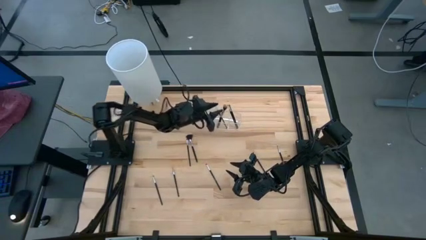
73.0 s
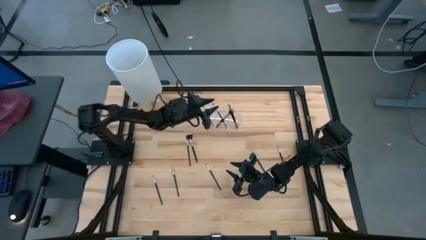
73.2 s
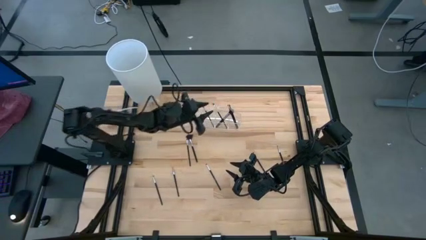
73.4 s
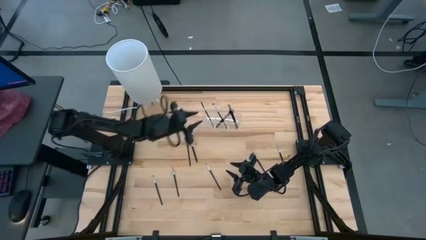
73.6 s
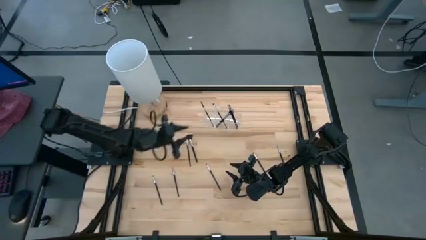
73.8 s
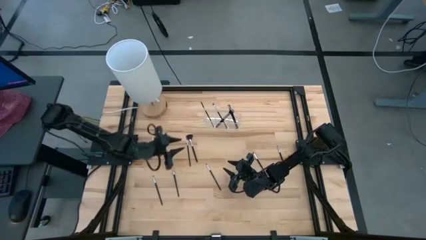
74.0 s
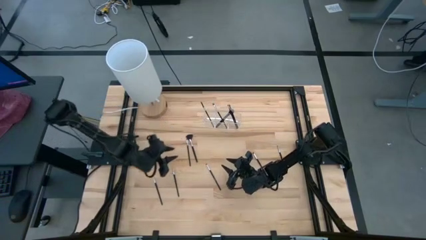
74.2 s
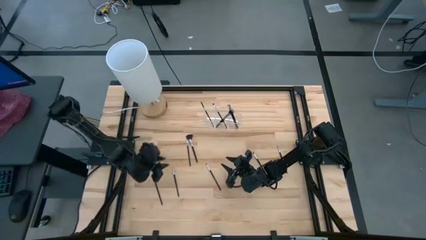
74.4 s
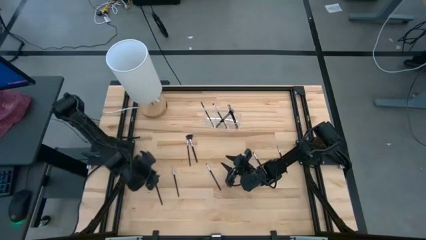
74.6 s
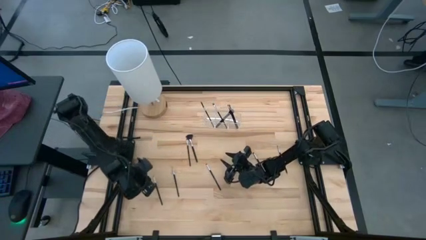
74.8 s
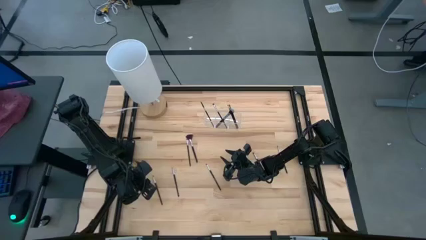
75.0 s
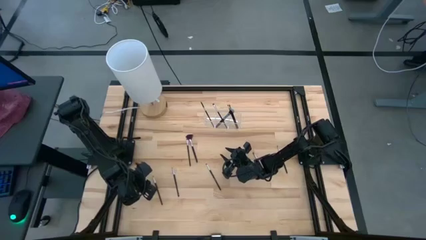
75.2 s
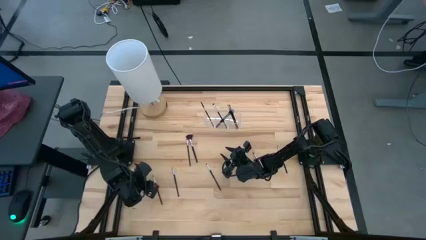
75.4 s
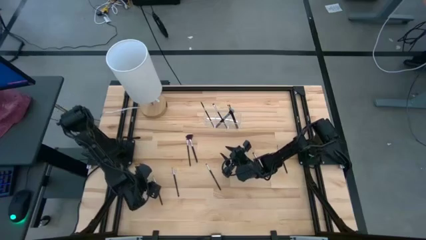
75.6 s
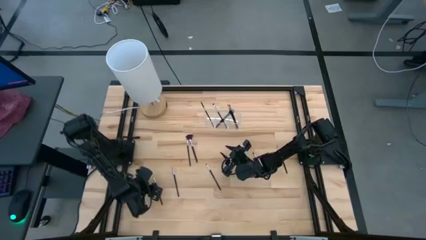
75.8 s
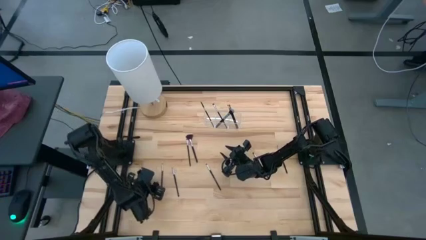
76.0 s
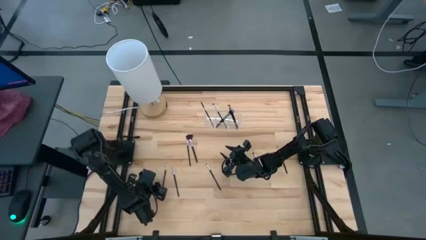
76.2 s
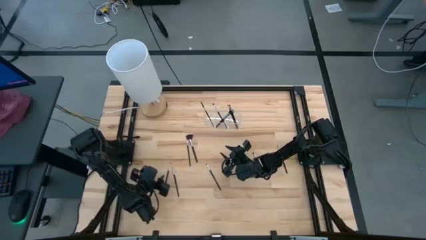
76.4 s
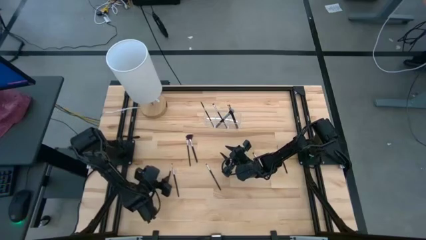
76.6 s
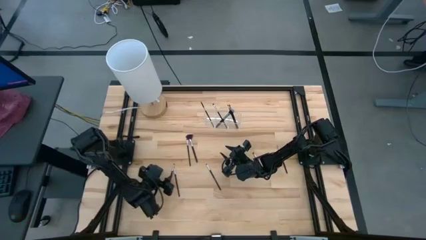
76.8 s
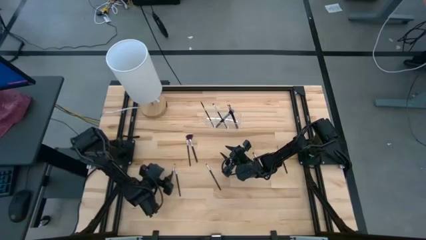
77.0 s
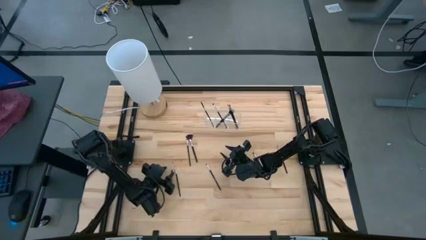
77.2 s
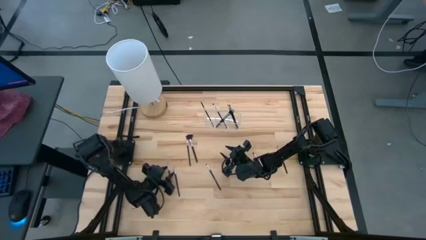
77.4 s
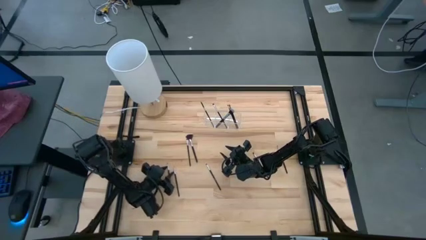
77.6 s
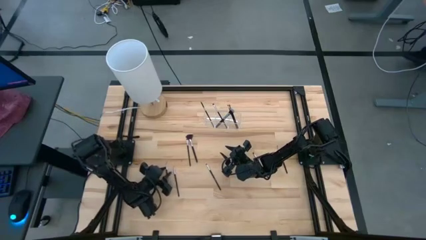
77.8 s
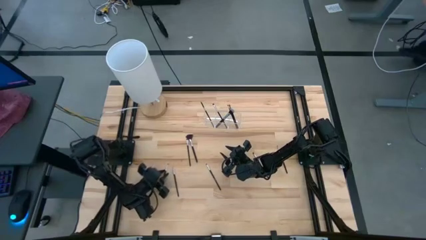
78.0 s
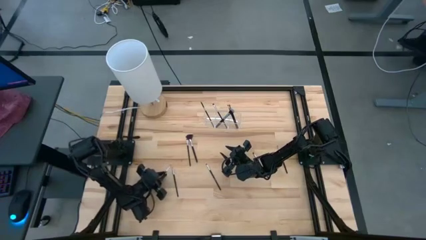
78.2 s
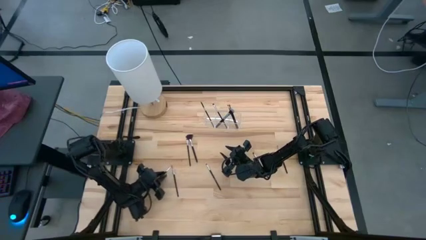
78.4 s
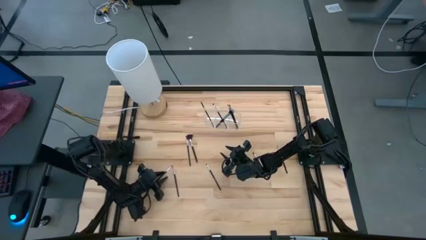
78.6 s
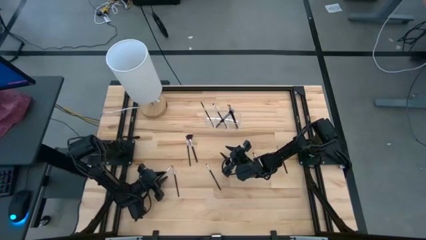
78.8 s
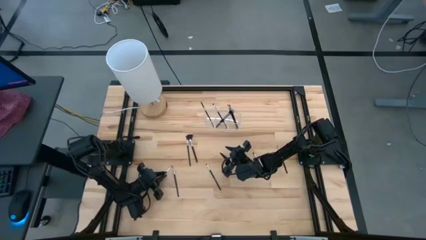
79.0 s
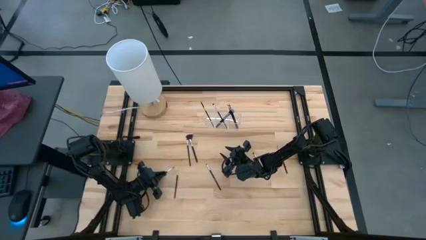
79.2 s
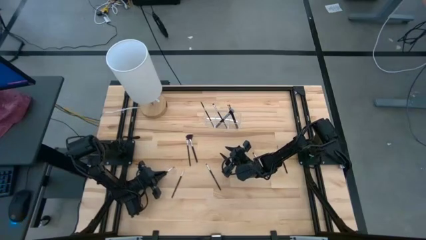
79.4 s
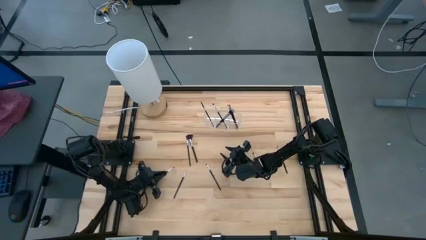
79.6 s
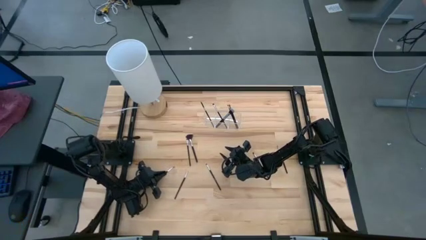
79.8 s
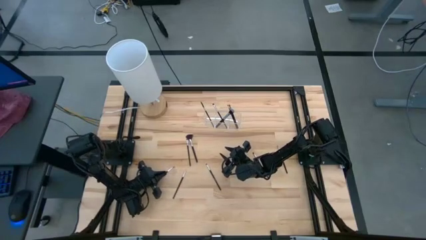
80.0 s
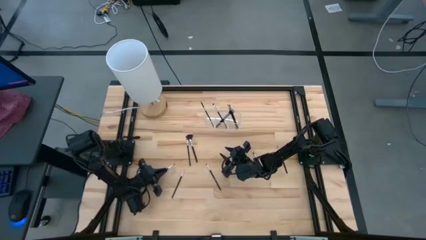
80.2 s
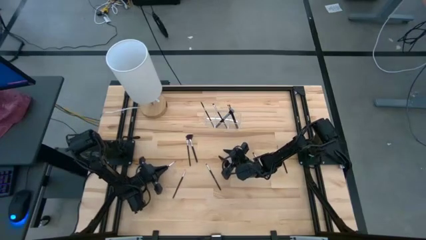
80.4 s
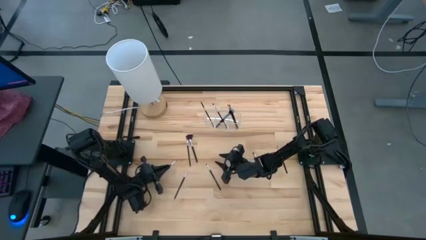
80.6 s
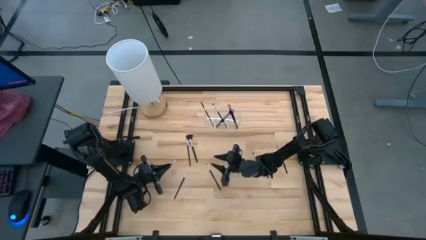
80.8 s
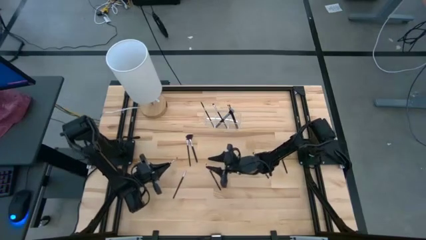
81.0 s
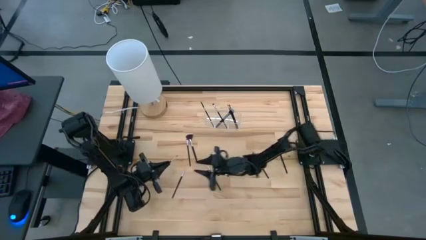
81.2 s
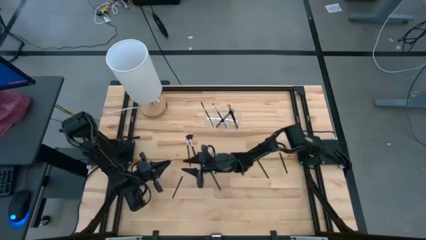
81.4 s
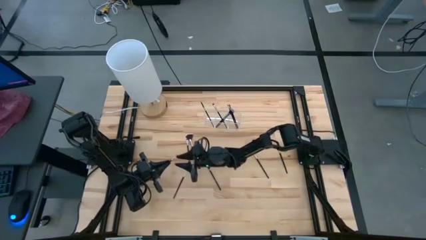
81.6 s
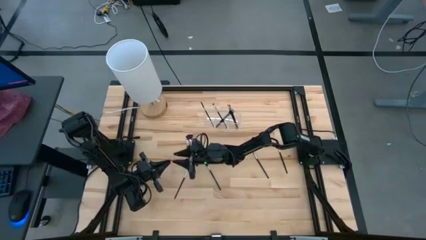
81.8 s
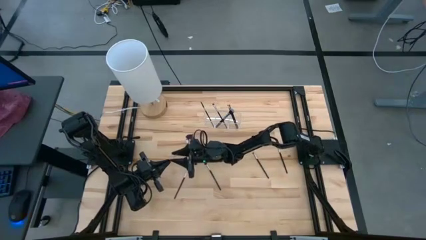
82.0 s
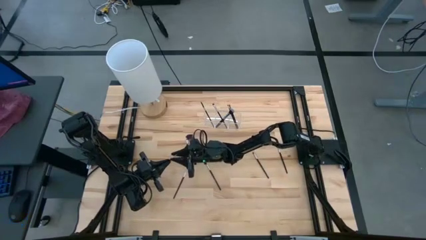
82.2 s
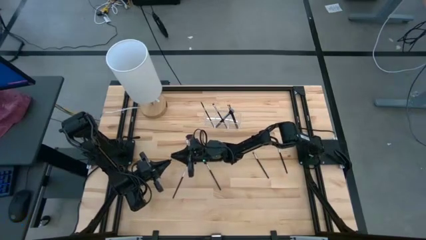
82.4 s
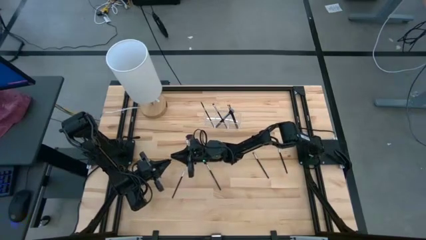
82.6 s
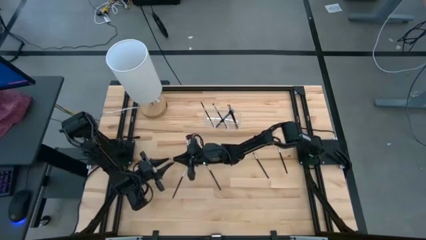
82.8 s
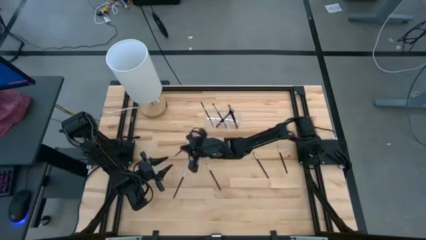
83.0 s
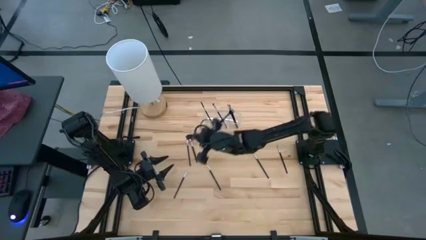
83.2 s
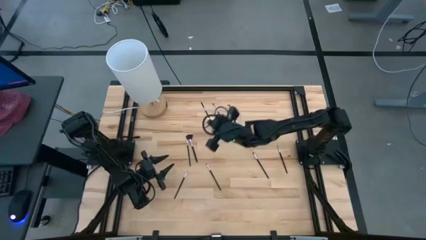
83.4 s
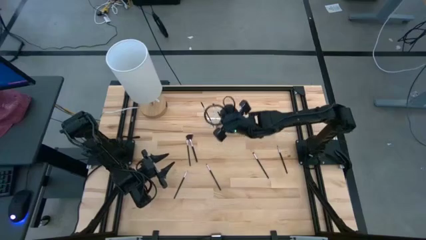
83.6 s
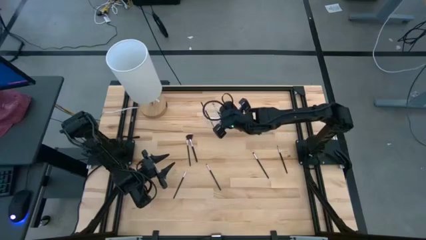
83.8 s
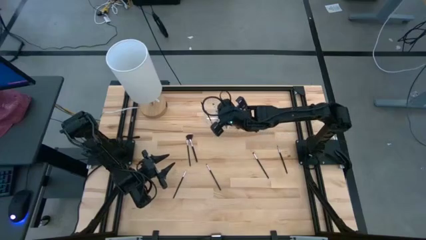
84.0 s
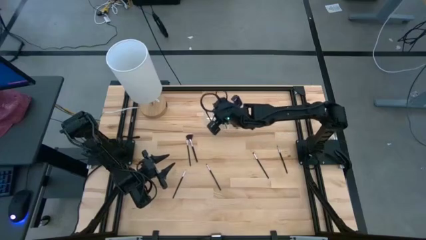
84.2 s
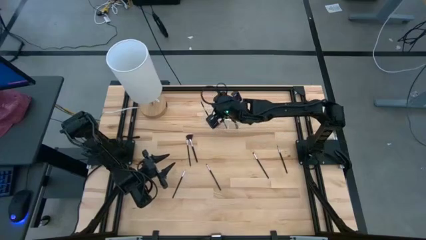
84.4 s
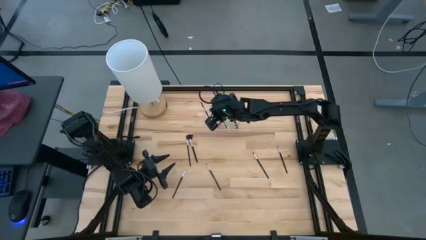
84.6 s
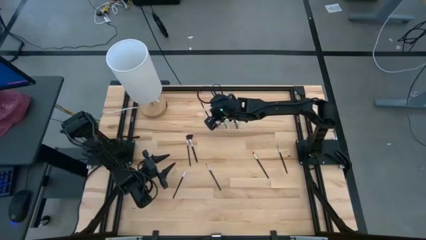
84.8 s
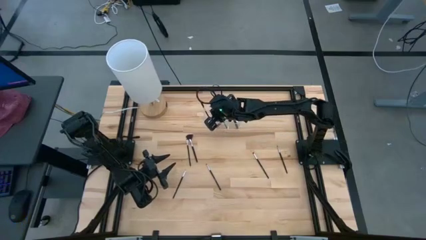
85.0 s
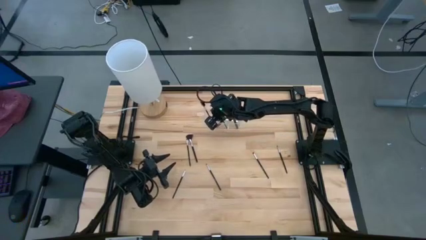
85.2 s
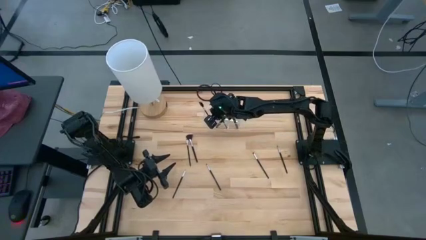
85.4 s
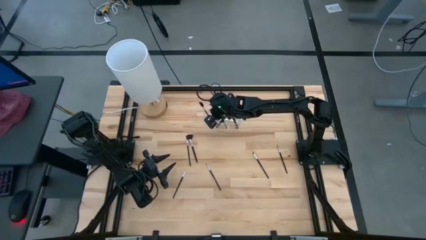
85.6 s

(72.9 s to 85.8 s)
Task: Put items in baskets/containers
Put the black liner brush into the transparent organizer

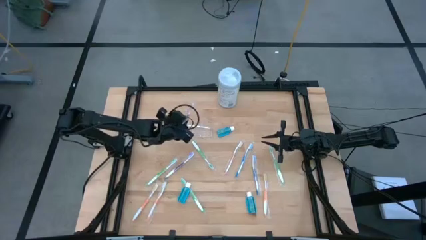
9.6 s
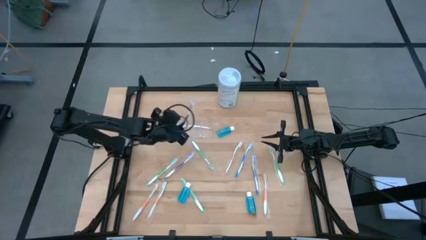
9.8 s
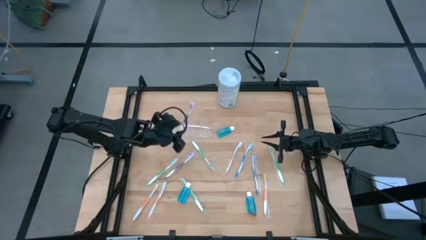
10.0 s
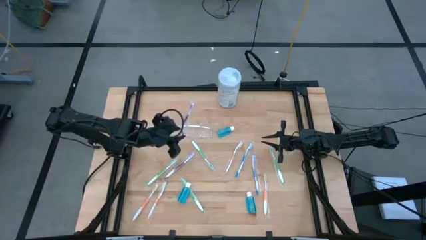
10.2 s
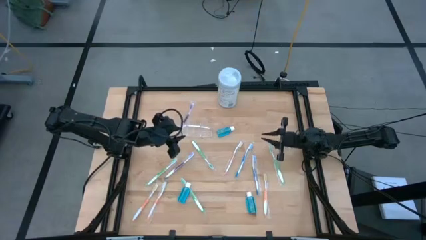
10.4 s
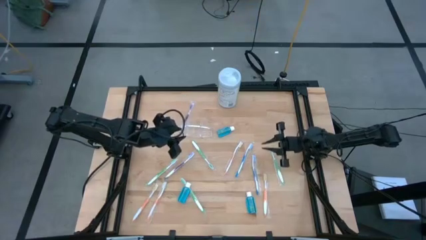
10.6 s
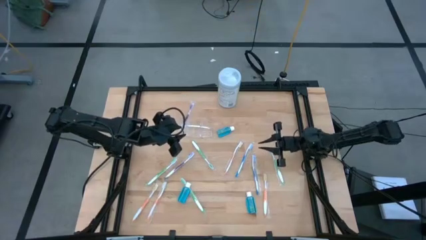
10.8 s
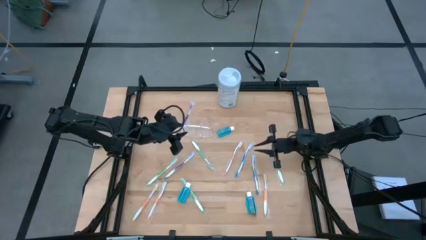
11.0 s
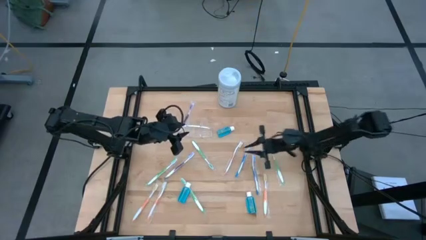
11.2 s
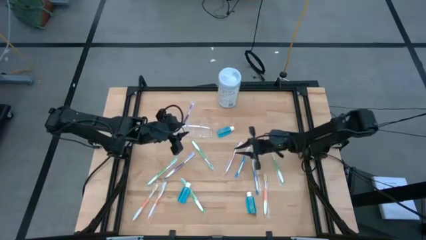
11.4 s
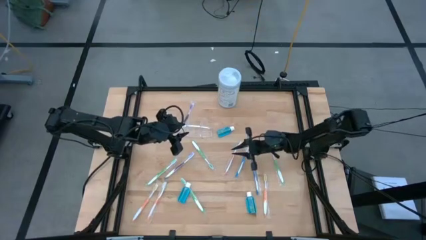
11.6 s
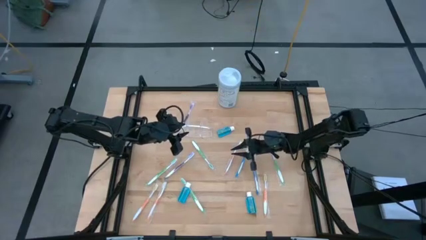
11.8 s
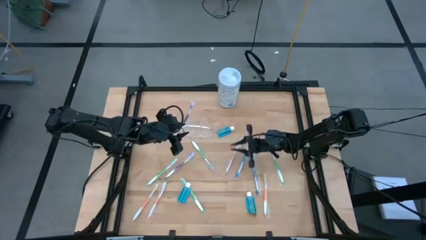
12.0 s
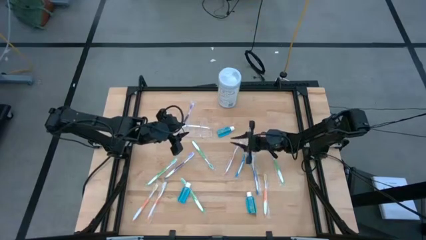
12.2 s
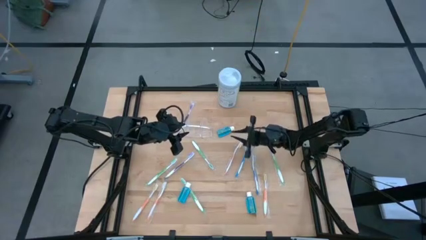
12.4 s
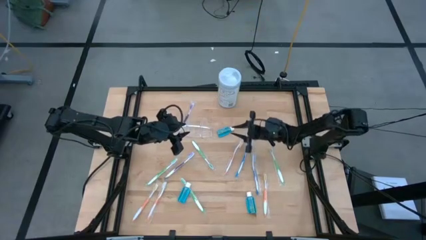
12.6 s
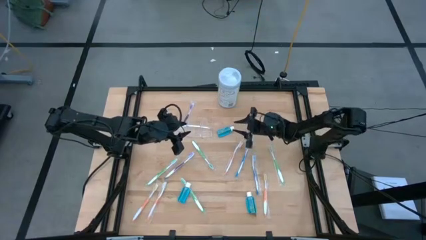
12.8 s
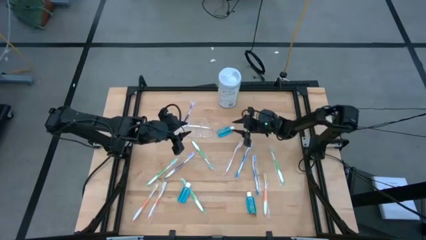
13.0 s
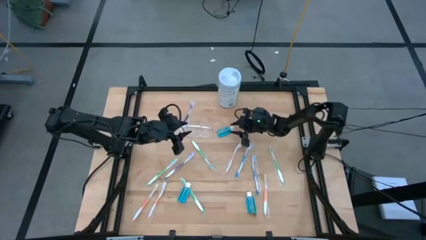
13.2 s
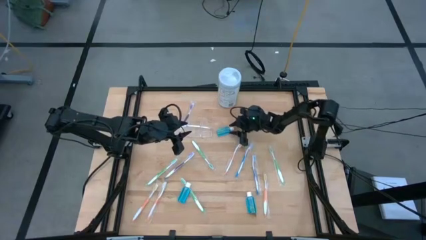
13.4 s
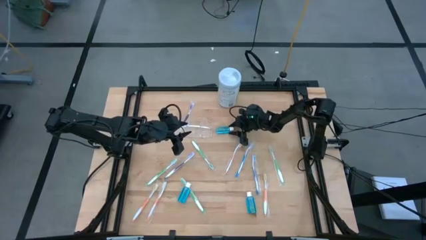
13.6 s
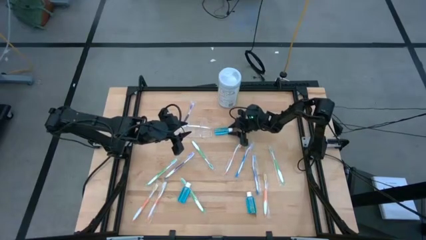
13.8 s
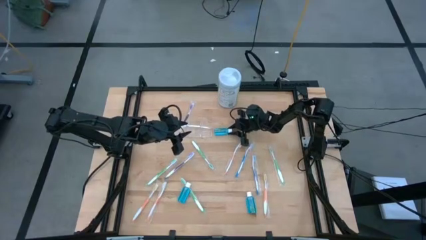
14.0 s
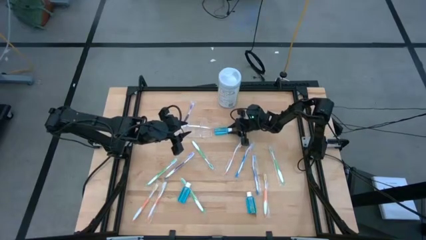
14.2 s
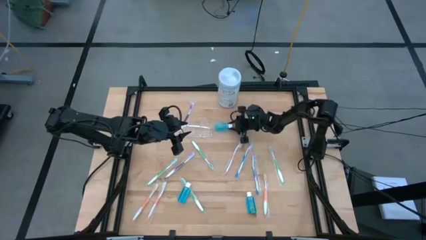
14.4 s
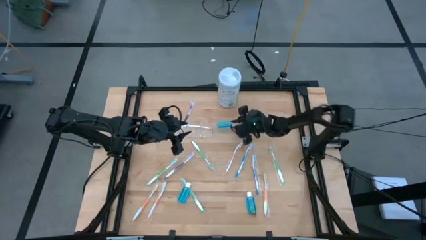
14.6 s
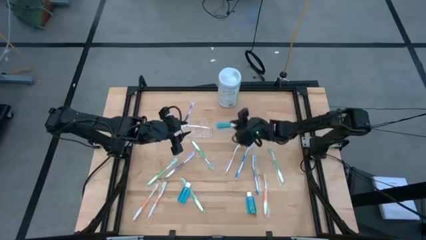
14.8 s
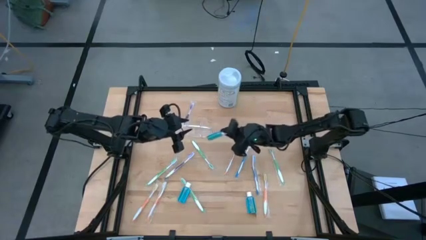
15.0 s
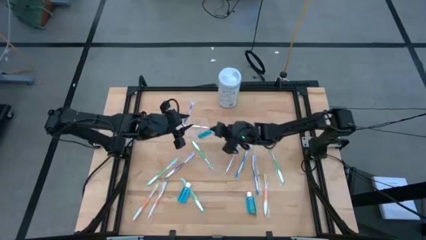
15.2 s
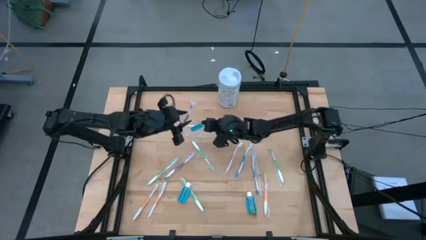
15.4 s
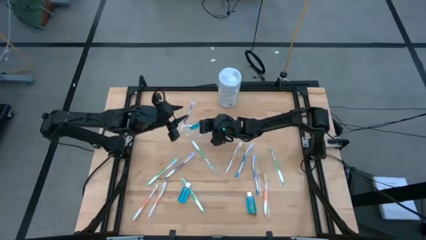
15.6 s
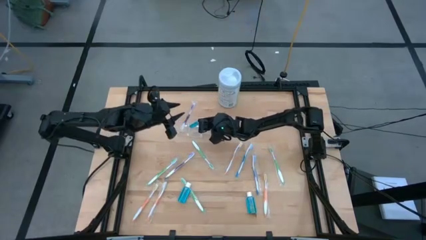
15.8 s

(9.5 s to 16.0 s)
Task: Pick & Place toothbrushing station
Put the blue mouthwash into the transparent organizer
